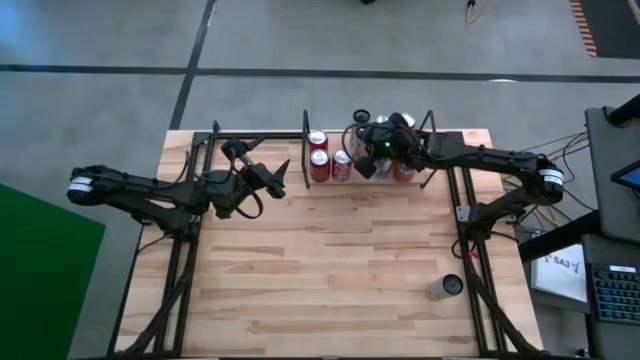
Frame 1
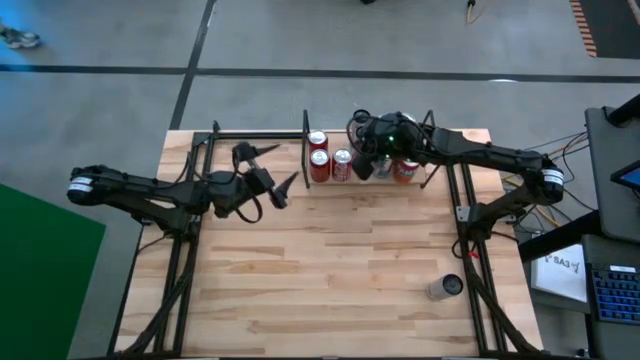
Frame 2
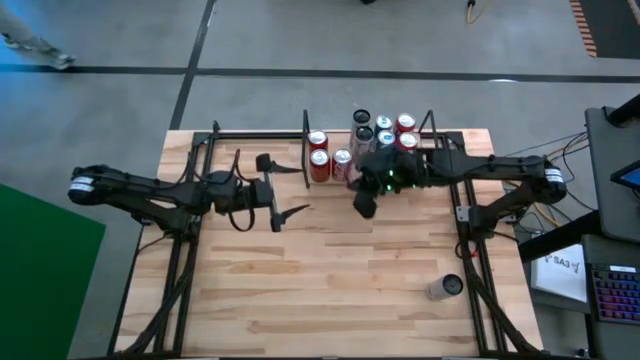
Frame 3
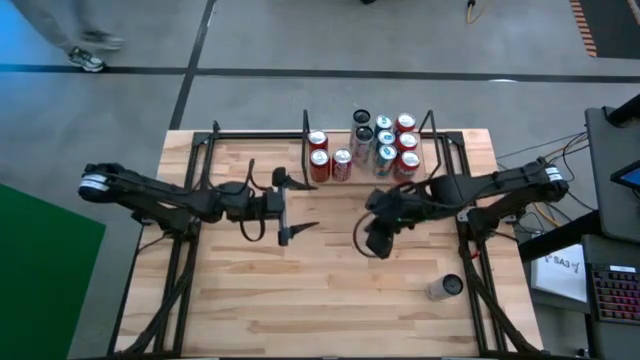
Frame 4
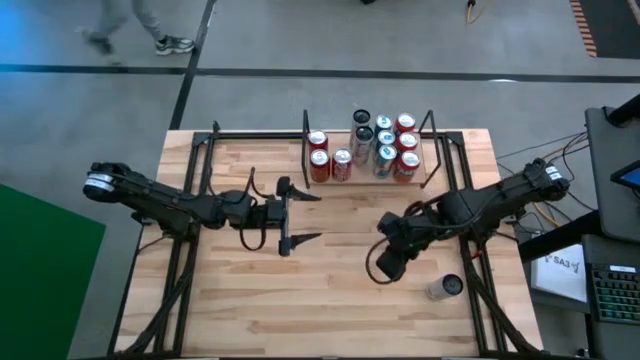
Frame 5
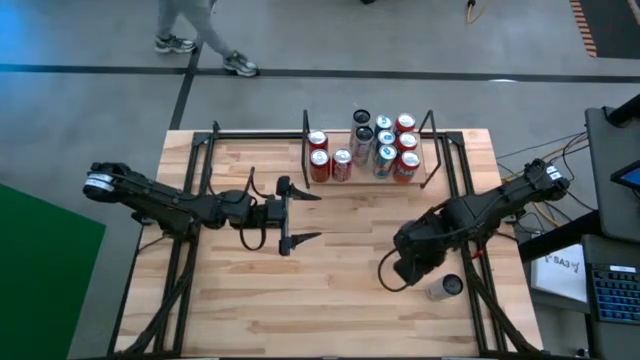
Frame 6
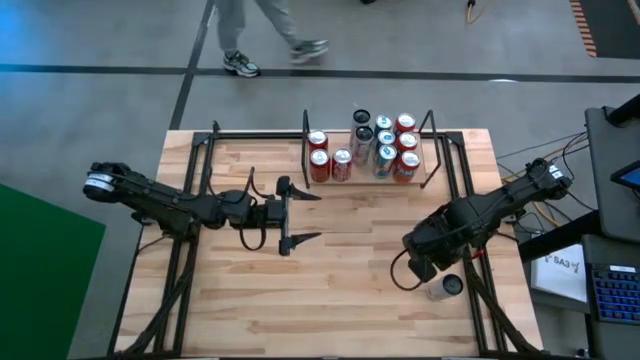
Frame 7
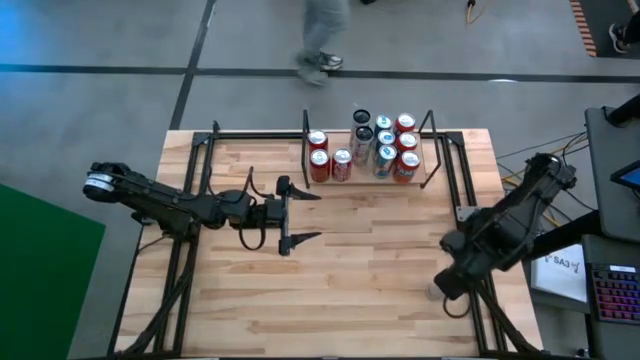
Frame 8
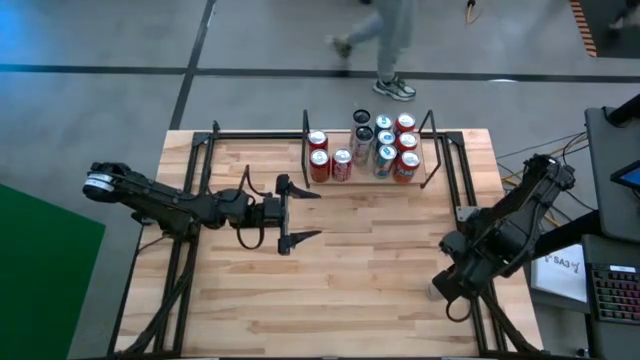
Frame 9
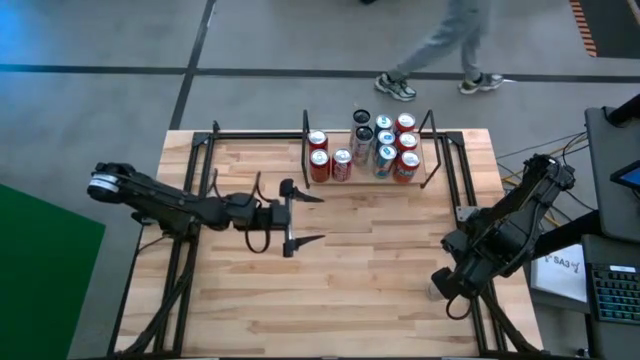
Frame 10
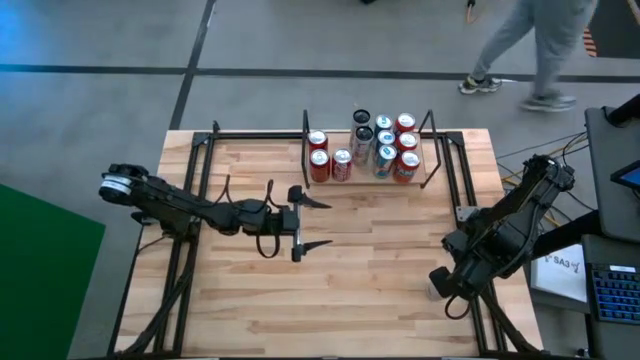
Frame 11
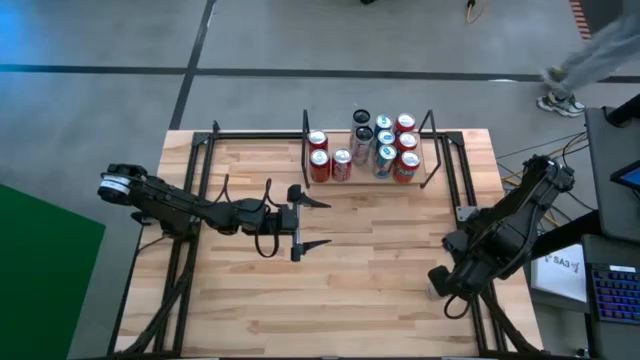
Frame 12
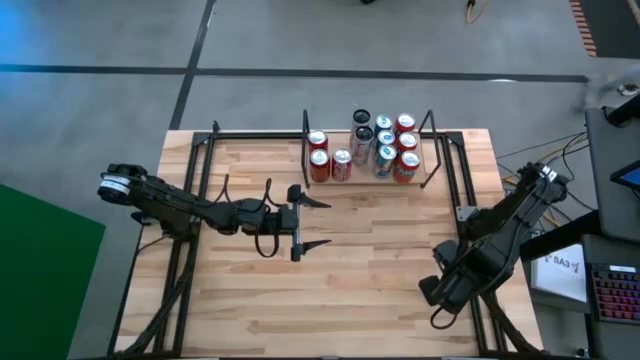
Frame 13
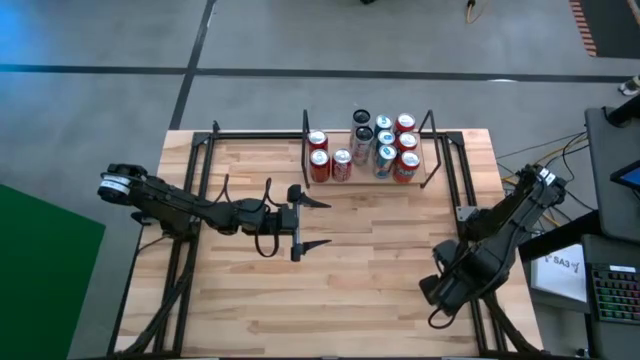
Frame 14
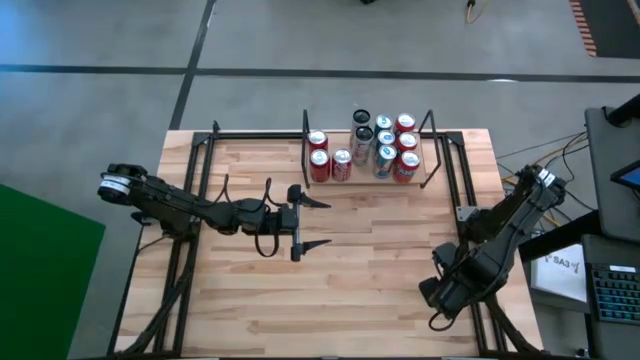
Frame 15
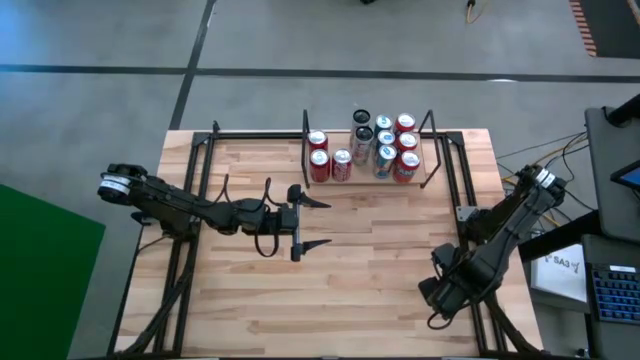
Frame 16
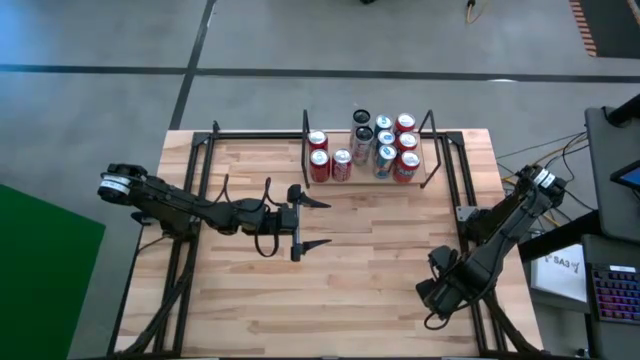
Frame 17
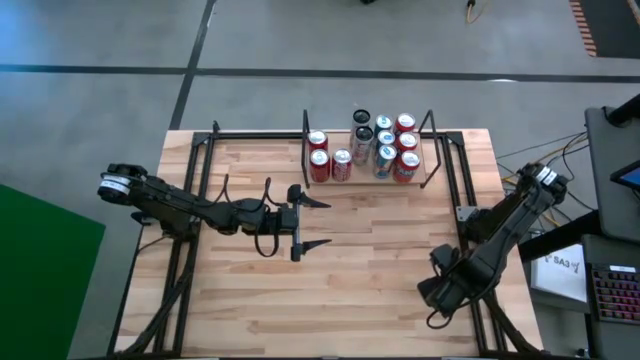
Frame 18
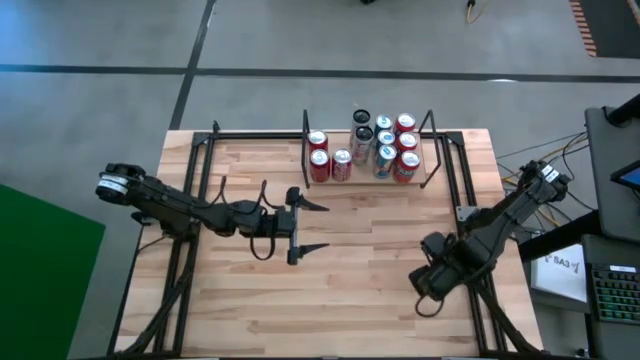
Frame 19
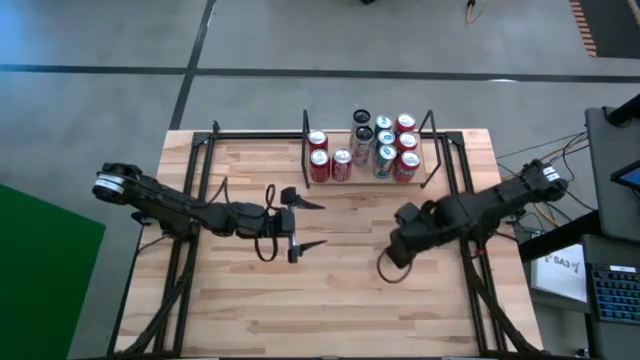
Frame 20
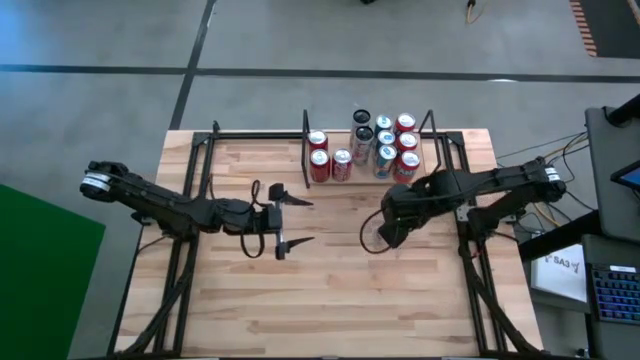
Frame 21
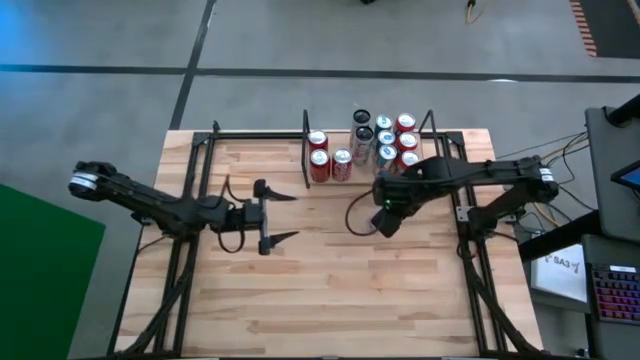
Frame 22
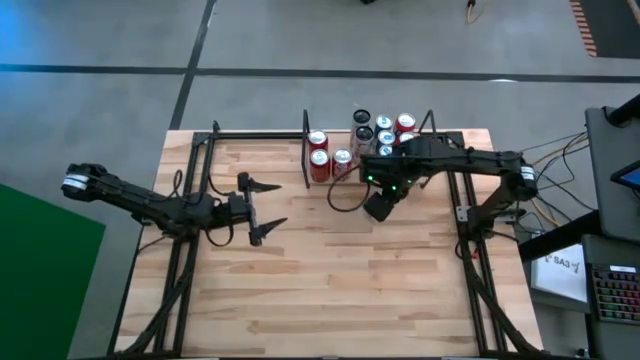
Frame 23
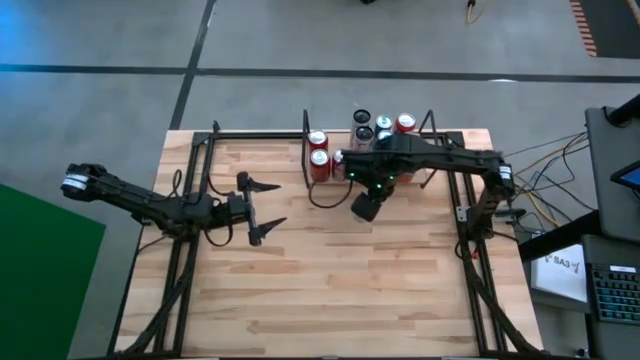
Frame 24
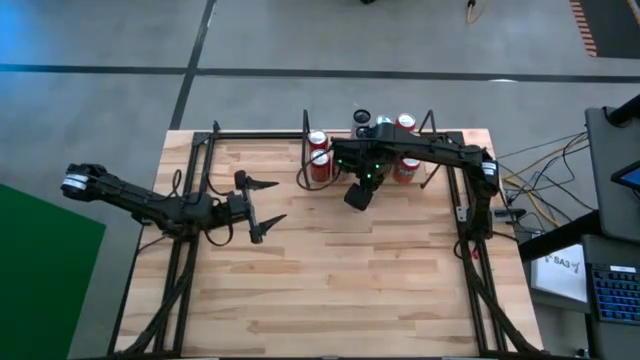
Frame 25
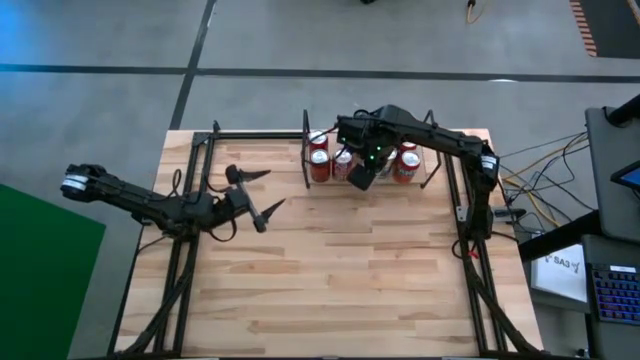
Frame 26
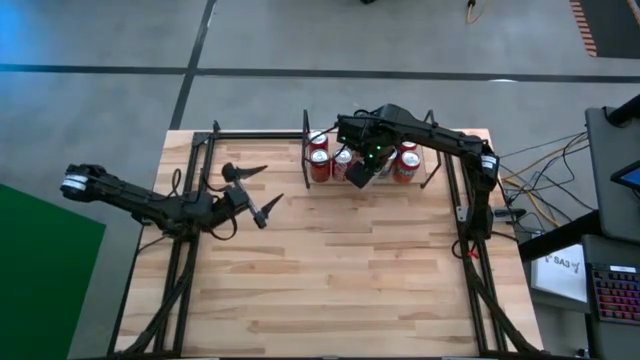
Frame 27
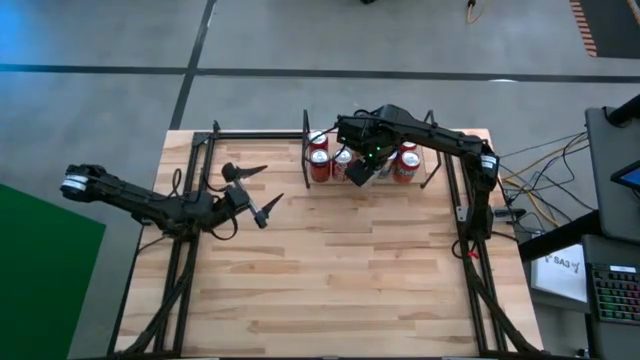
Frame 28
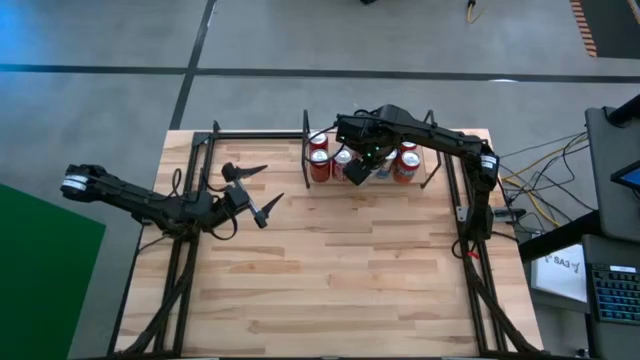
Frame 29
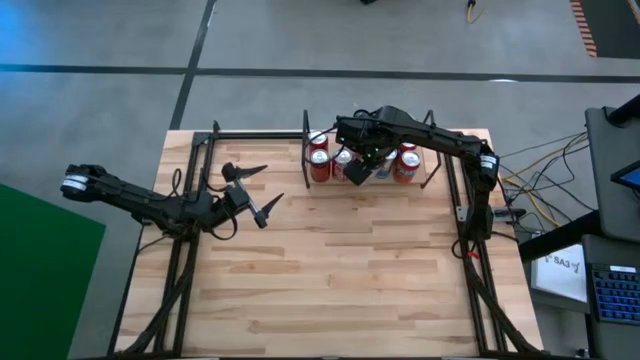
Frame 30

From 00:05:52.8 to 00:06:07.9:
Task: Place canned beverage on shelf
Put the white and pink soda can on the shelf

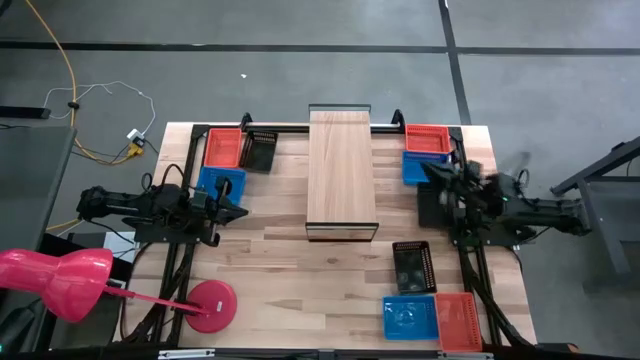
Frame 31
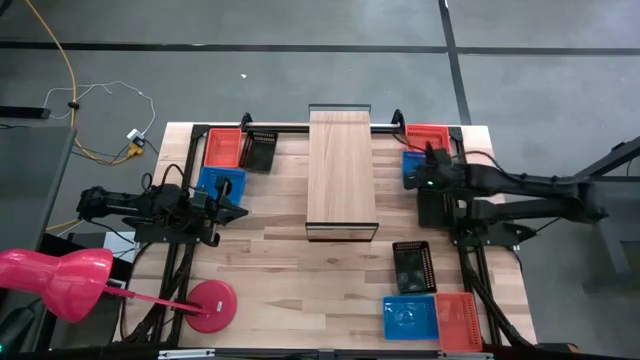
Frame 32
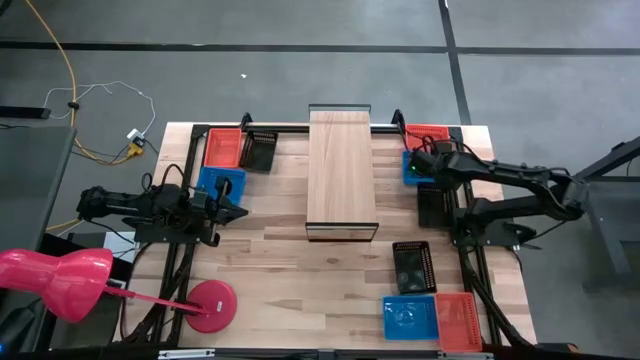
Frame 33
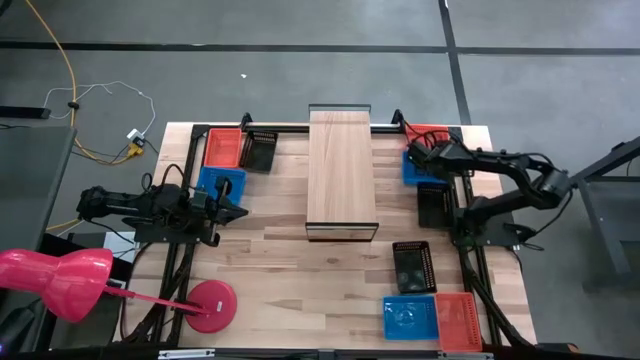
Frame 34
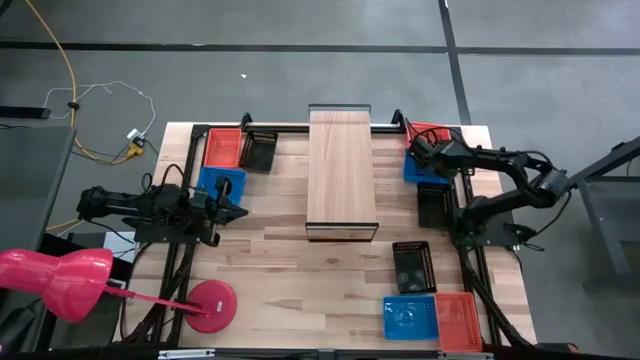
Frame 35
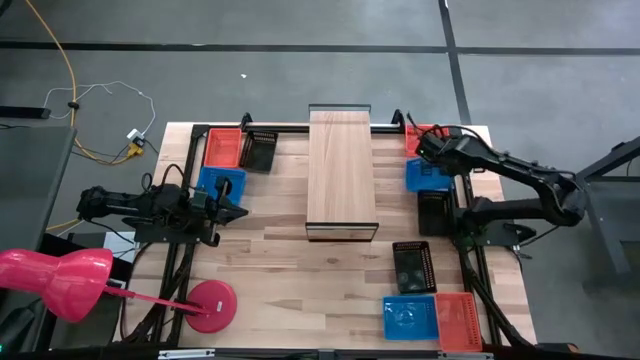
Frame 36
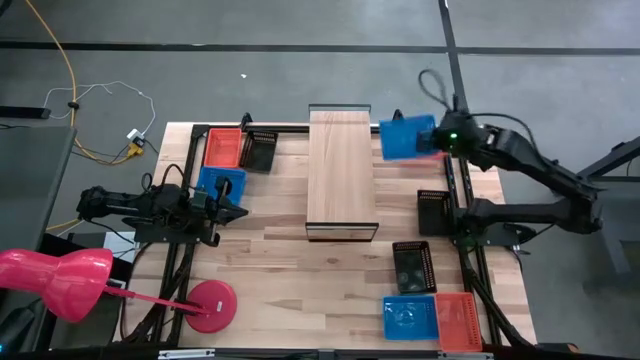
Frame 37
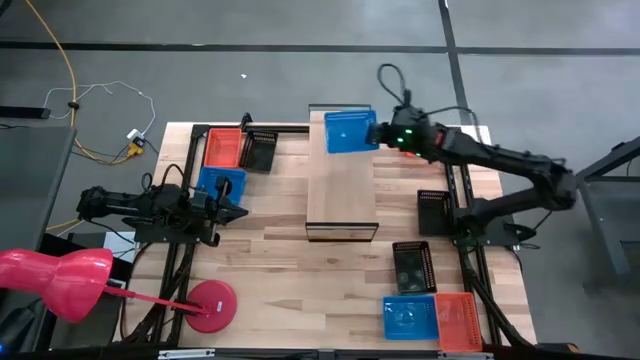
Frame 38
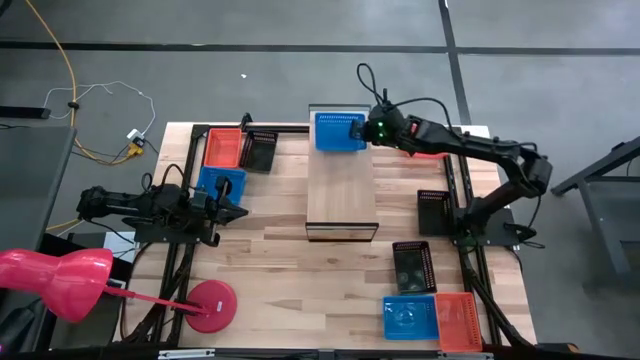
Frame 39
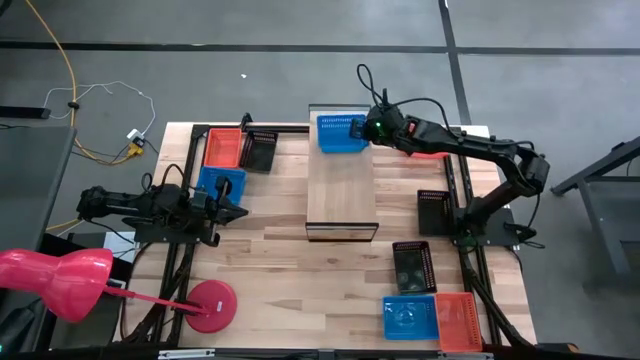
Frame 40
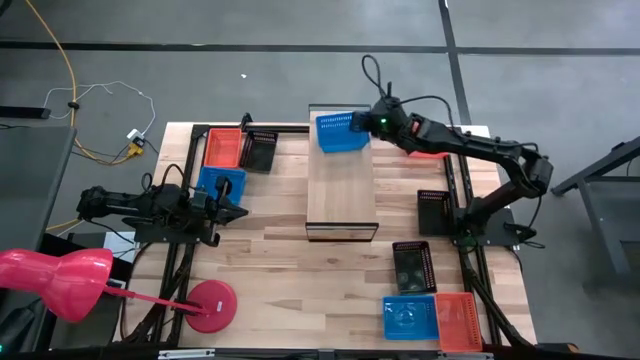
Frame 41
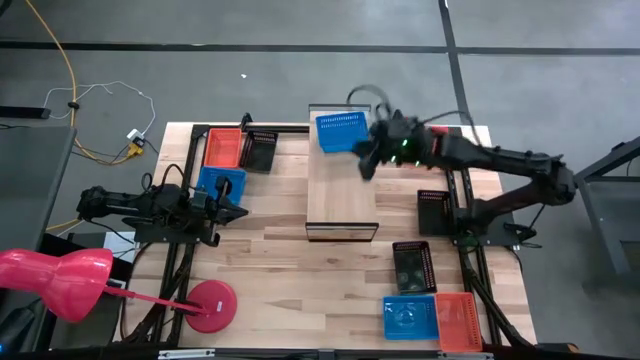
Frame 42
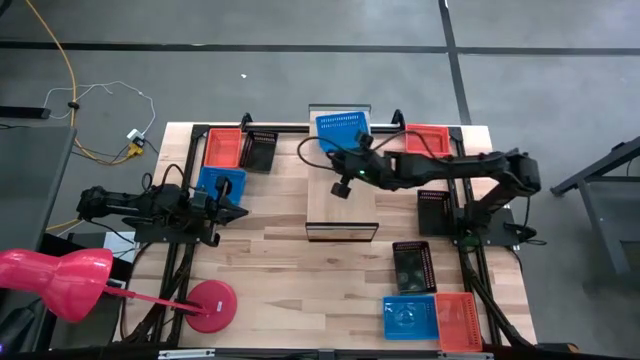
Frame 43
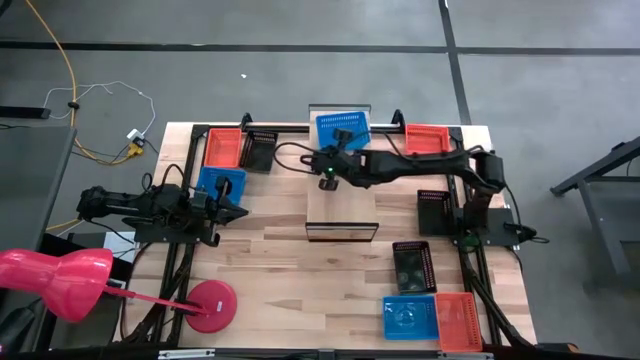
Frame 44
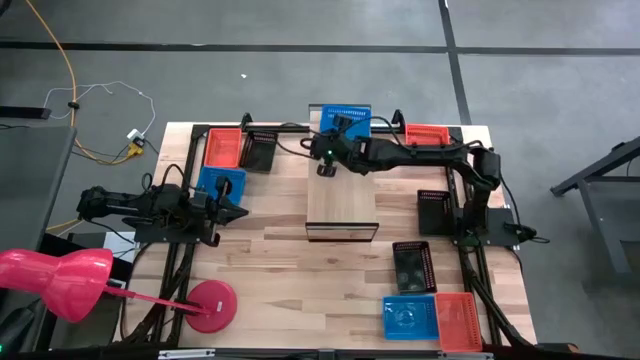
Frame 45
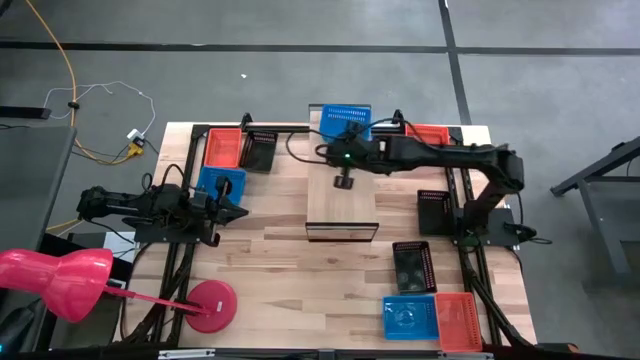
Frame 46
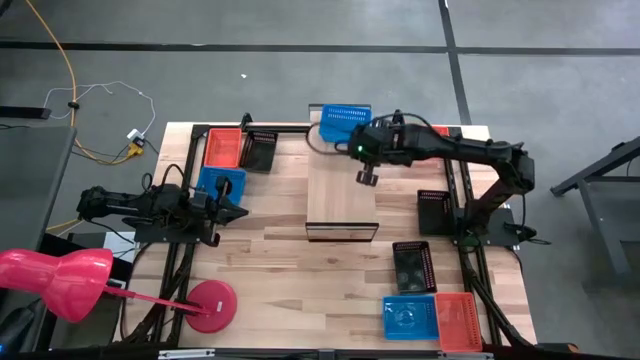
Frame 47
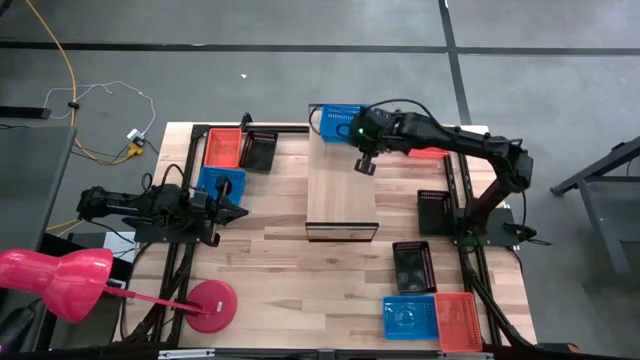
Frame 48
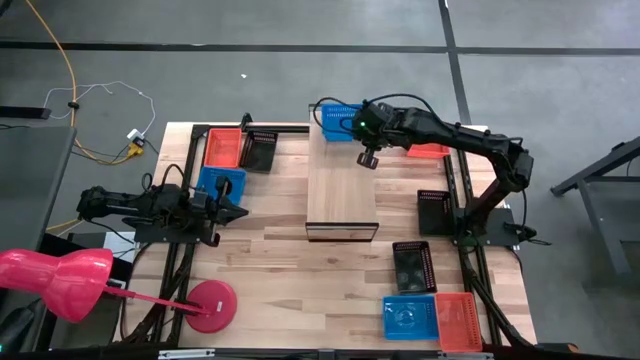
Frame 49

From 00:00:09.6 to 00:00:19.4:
Task: Stack baskets on shelf by color
Put the top right blue bin on the shelf
